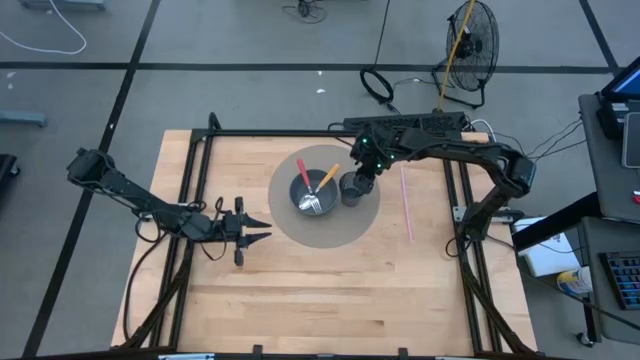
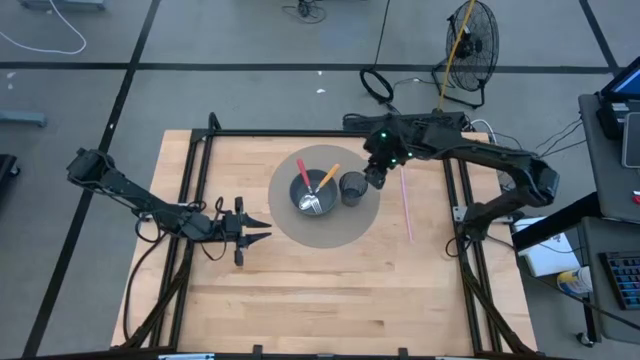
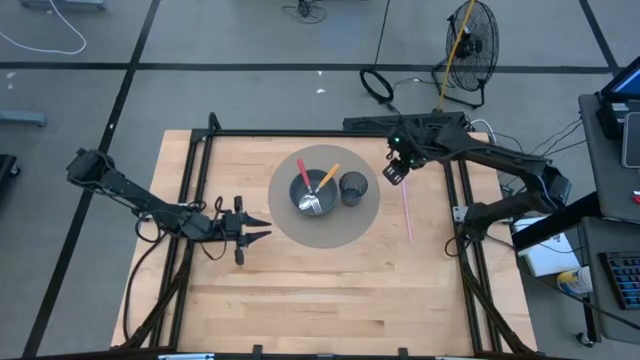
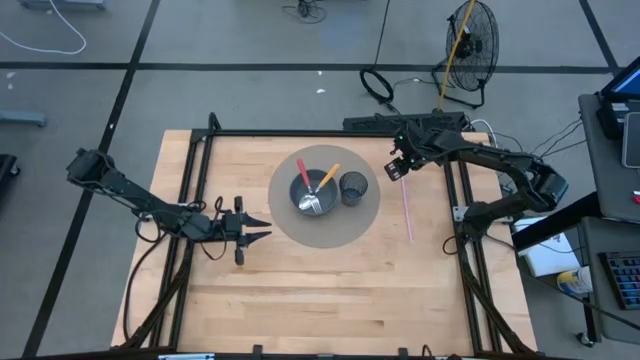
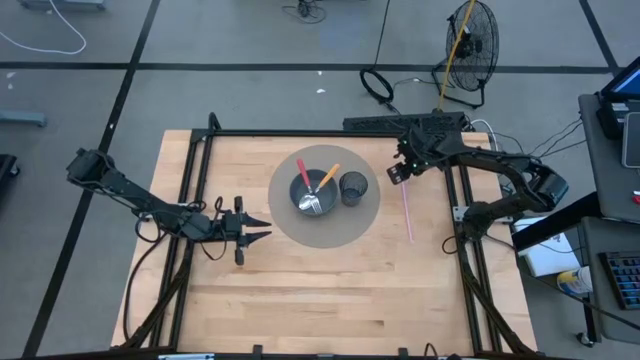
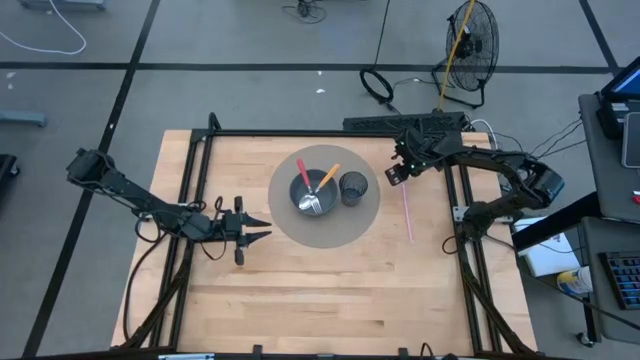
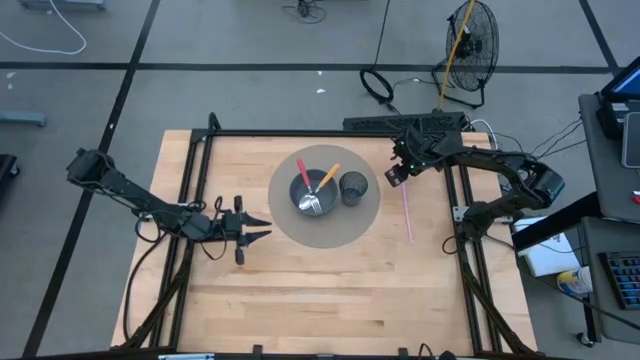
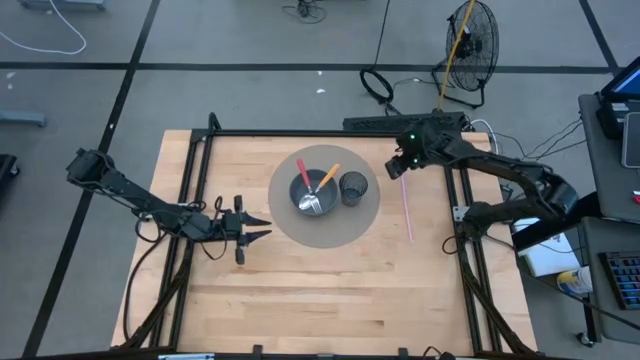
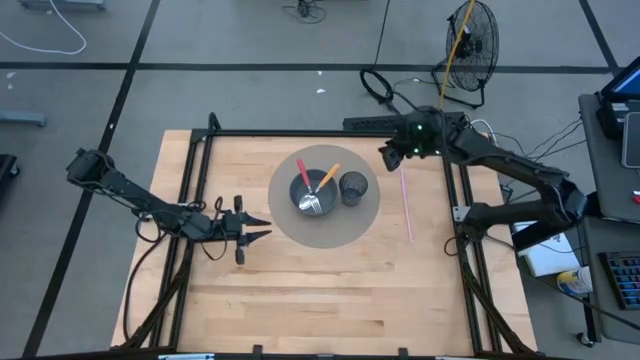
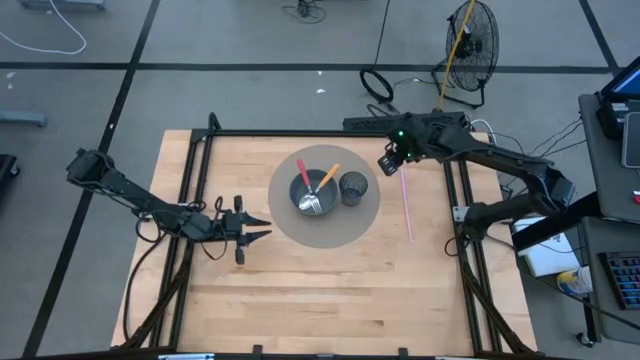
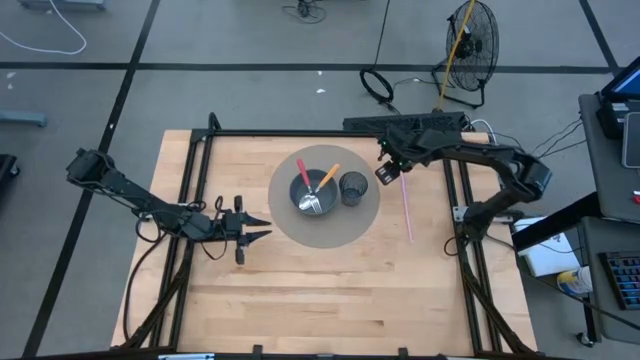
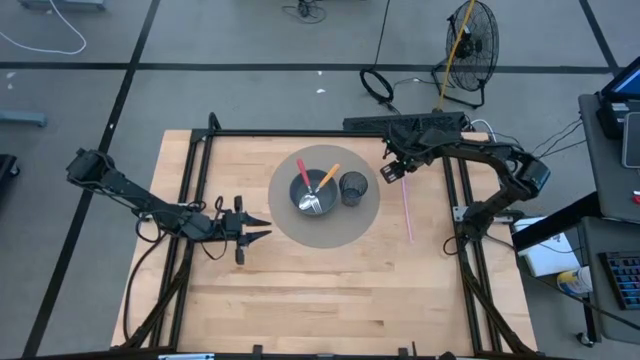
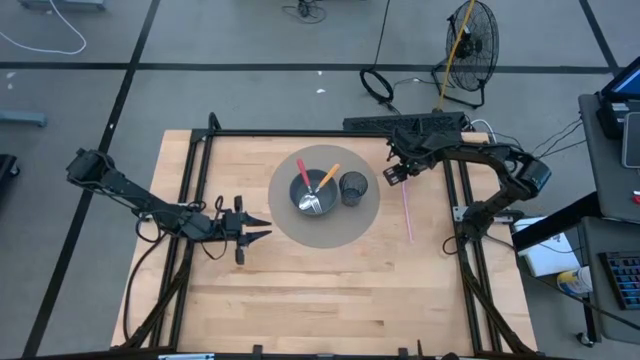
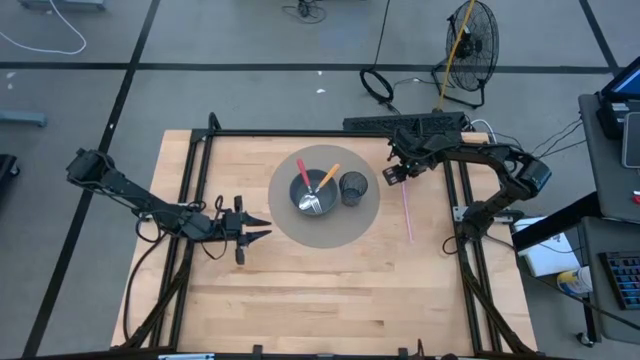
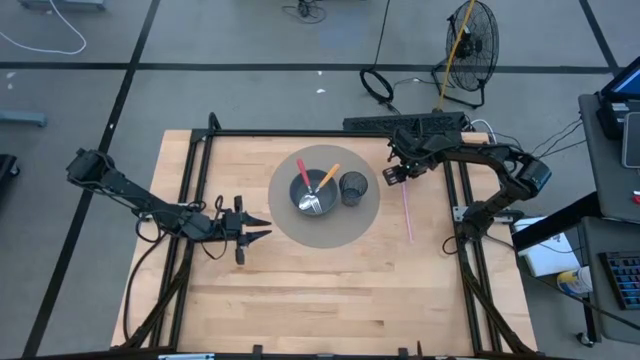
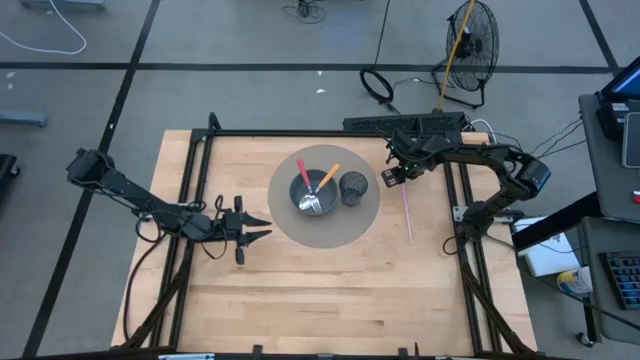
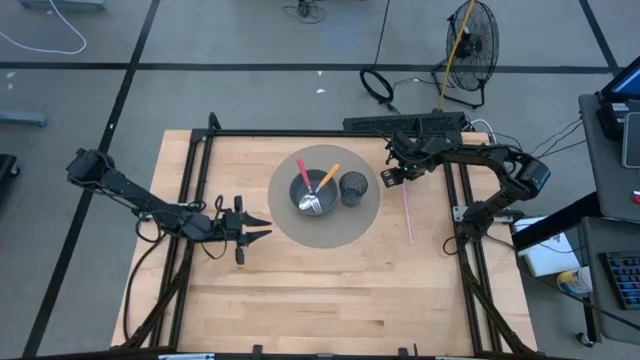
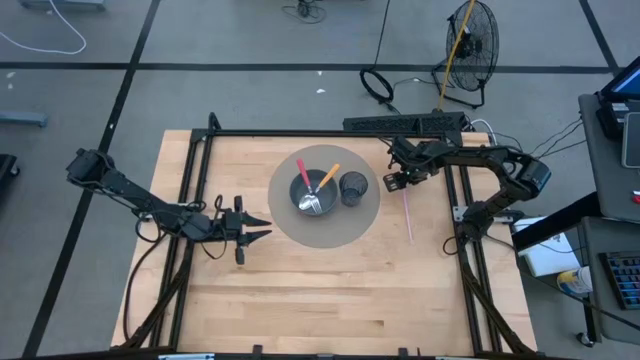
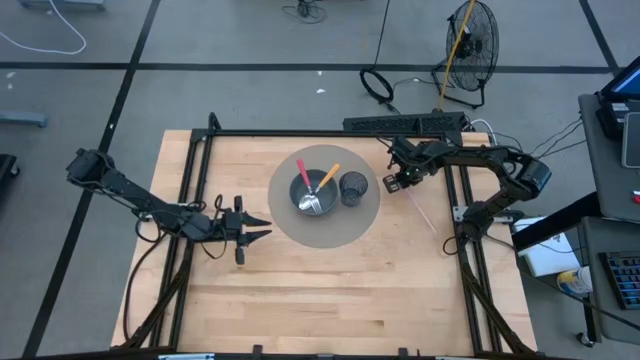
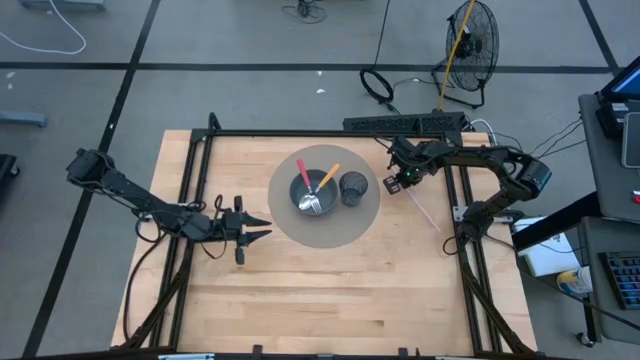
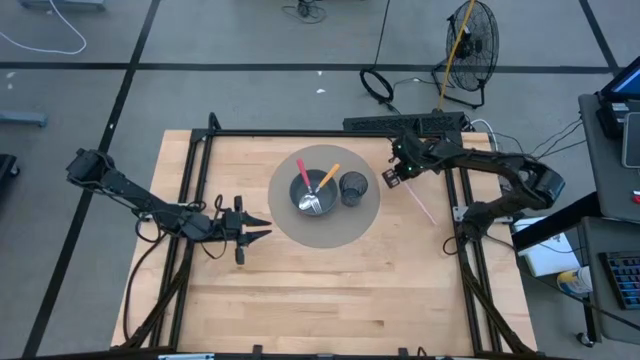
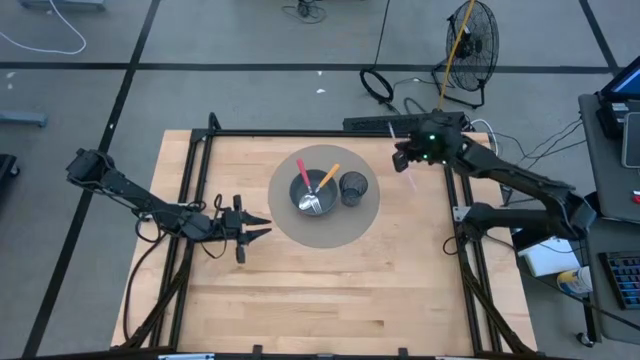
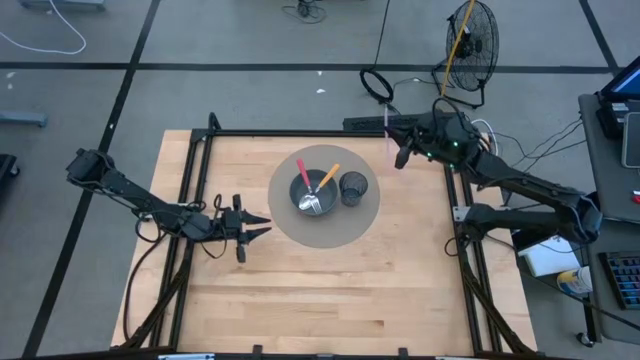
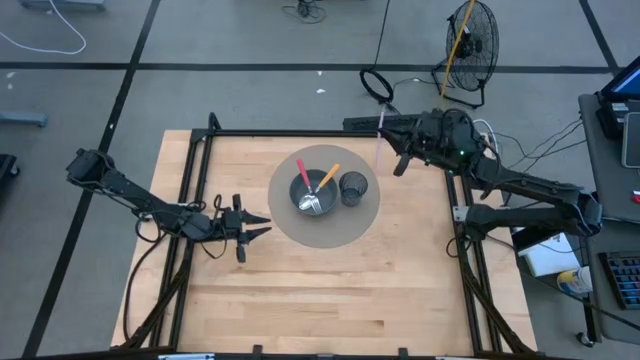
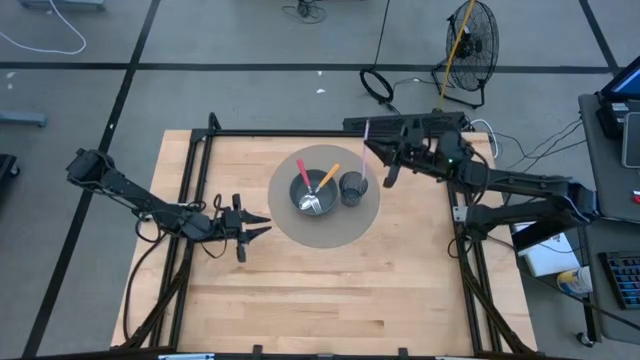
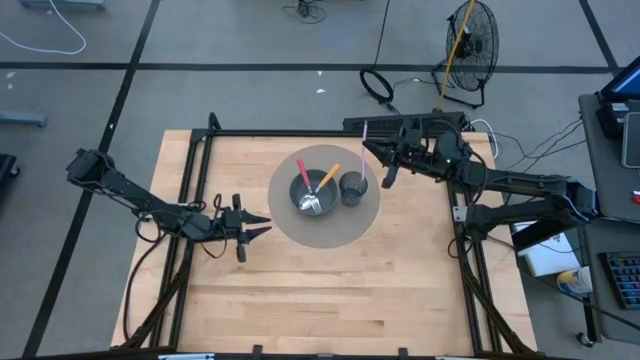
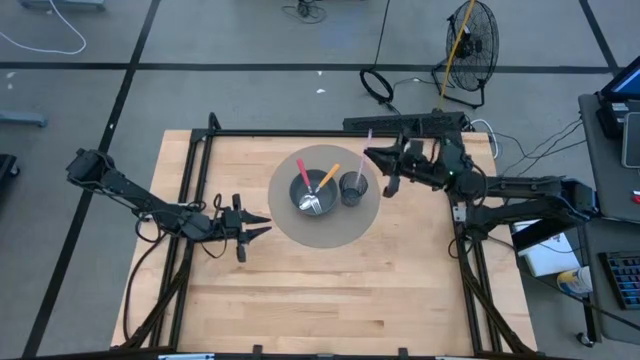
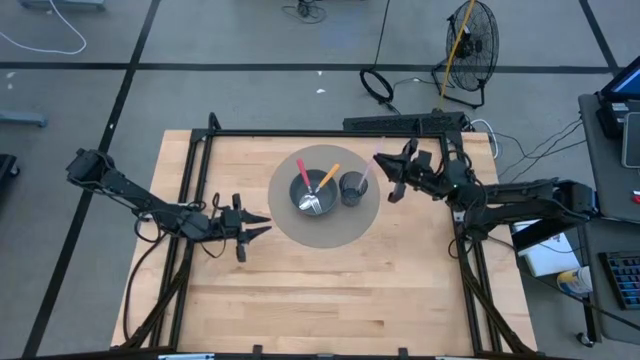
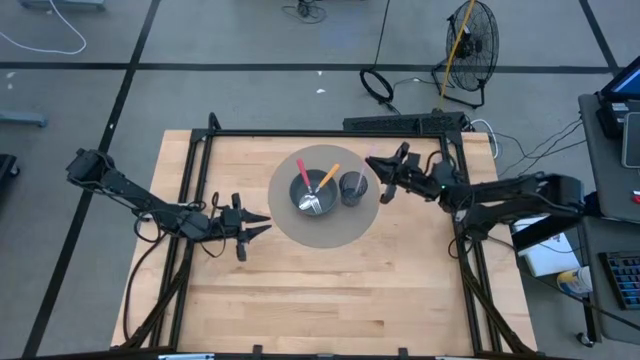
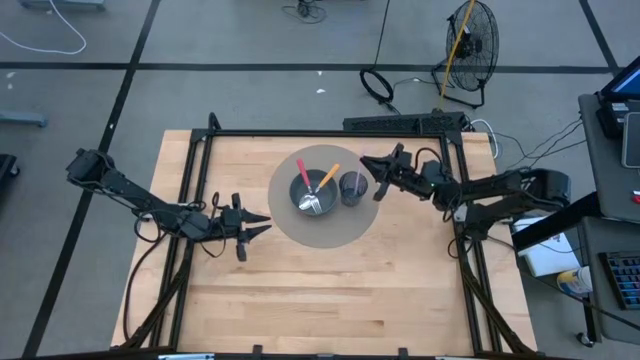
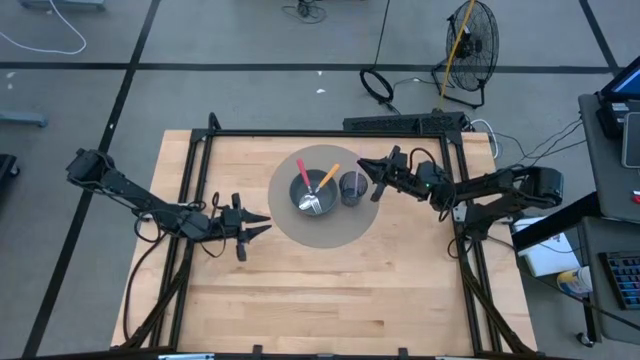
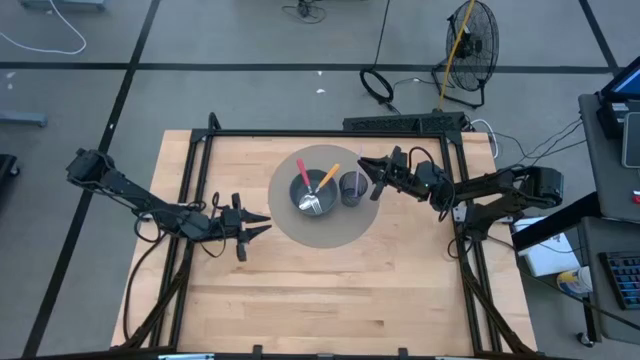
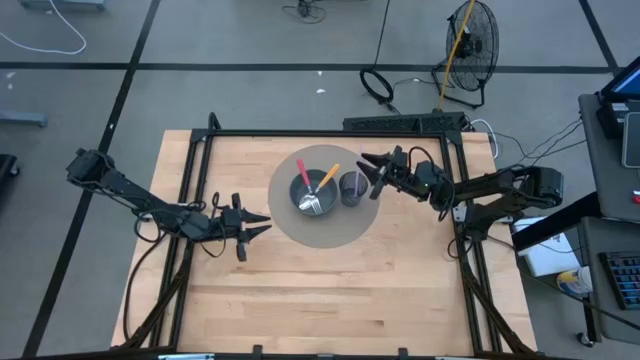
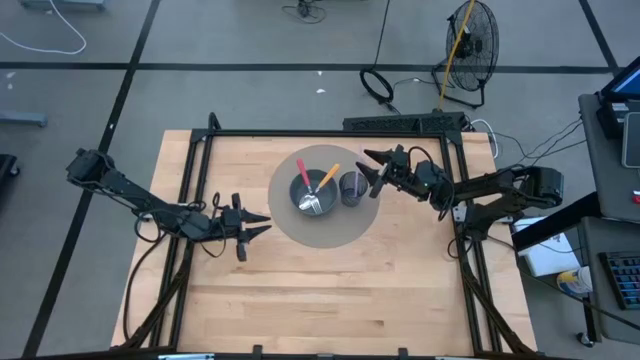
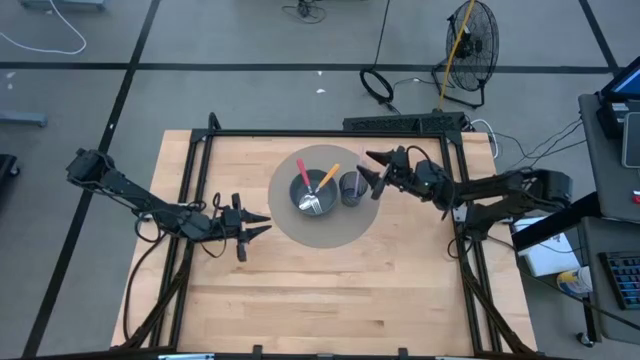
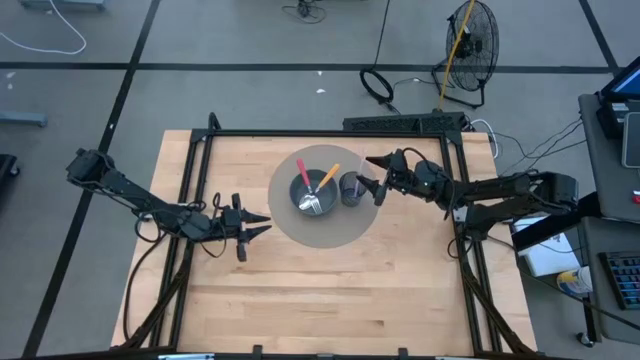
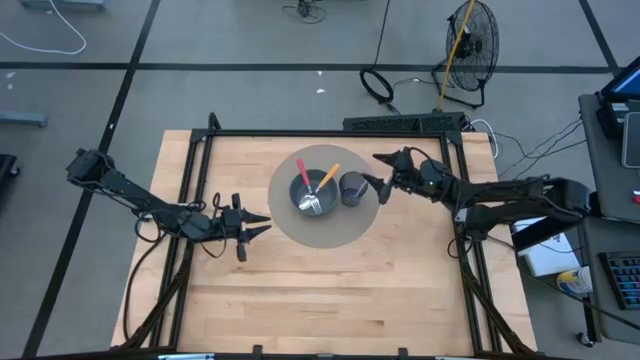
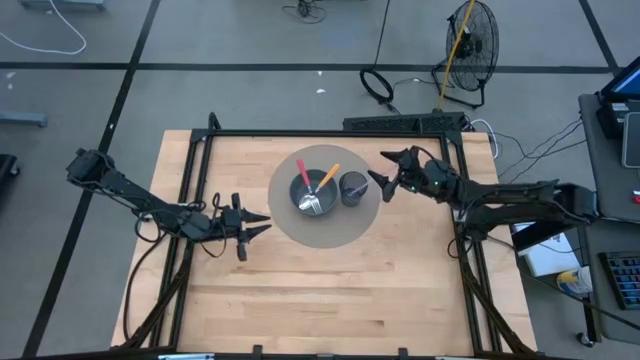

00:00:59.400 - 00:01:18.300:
Task: Pick & Place Utensil
Put the pink straw into the dark blue glass
